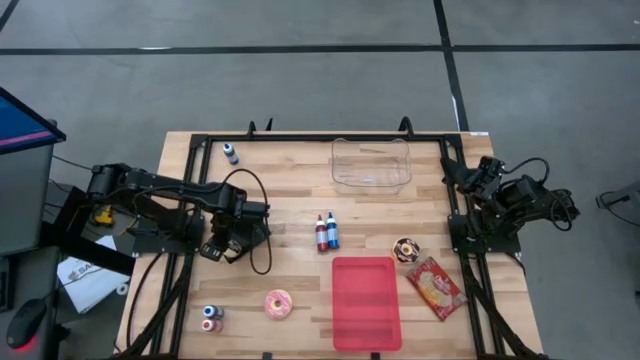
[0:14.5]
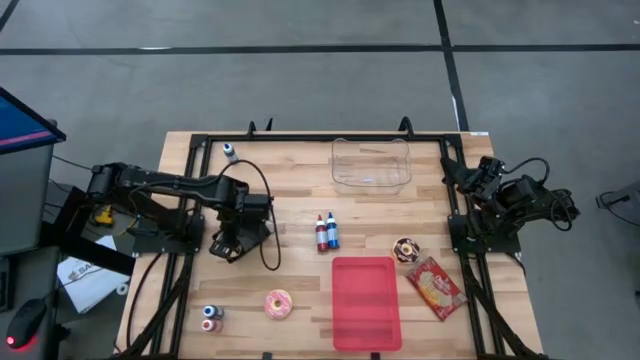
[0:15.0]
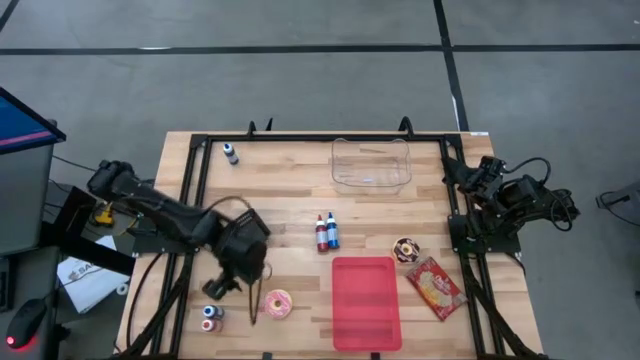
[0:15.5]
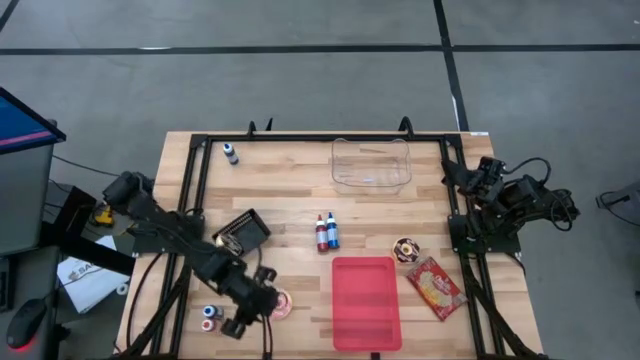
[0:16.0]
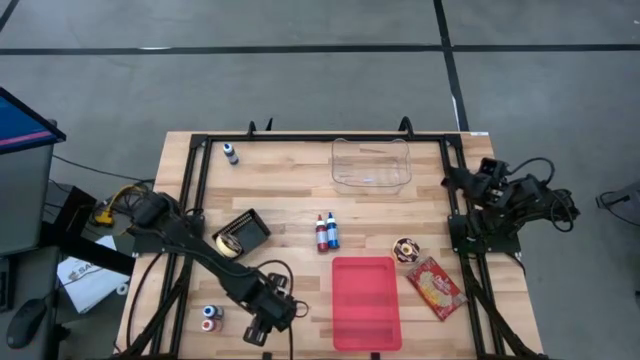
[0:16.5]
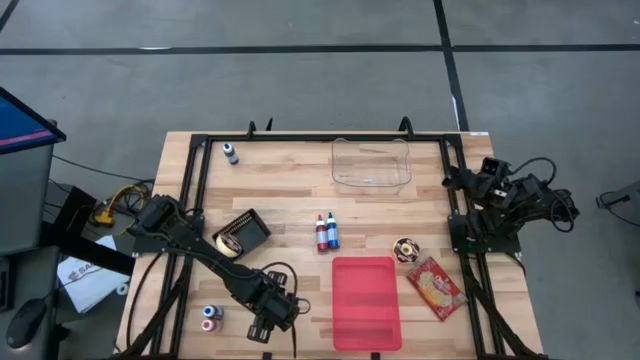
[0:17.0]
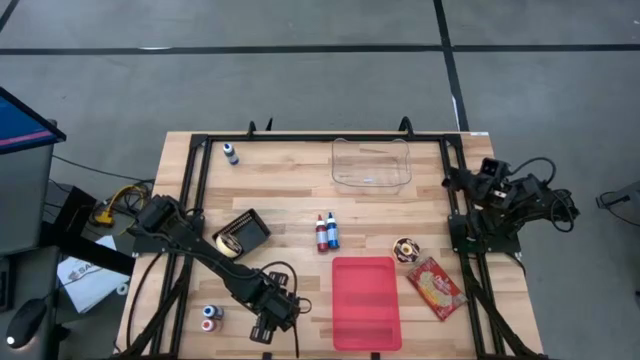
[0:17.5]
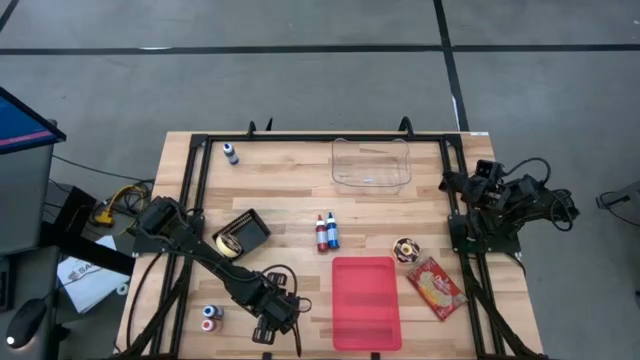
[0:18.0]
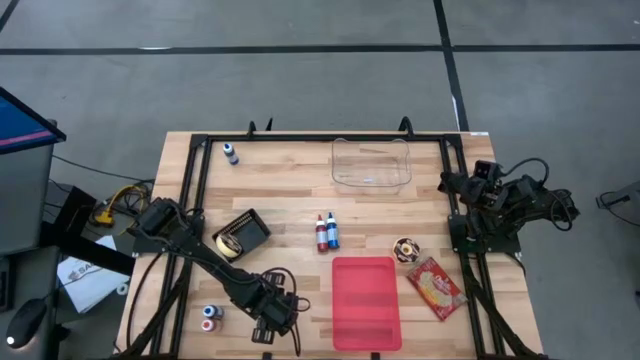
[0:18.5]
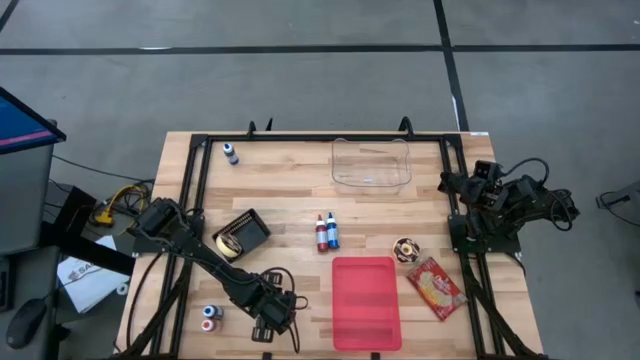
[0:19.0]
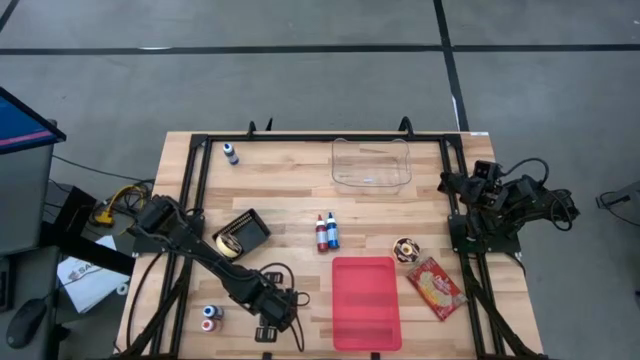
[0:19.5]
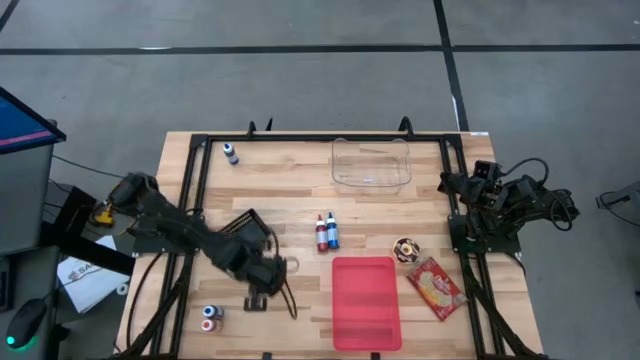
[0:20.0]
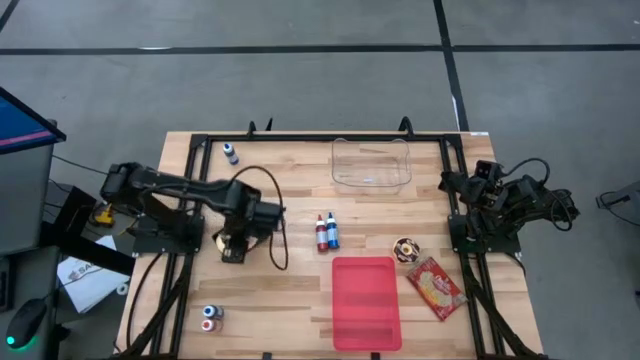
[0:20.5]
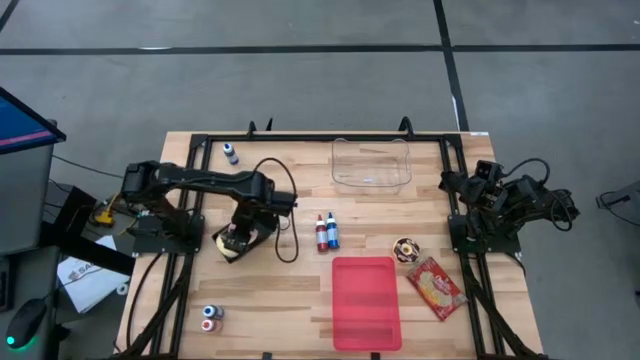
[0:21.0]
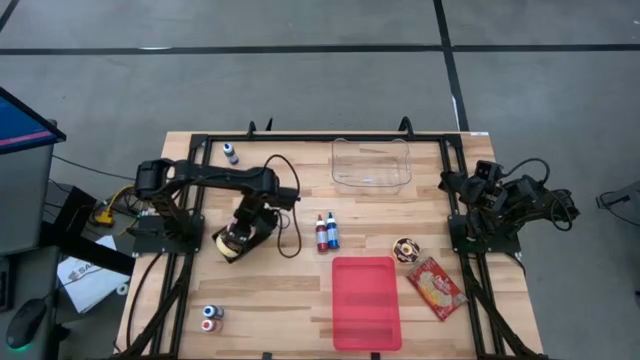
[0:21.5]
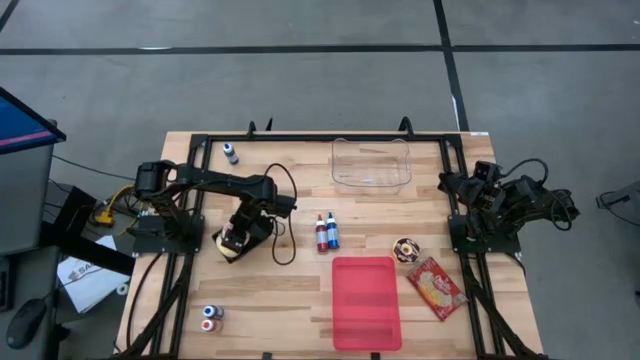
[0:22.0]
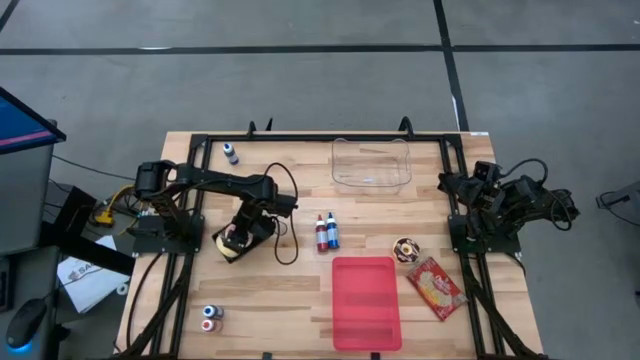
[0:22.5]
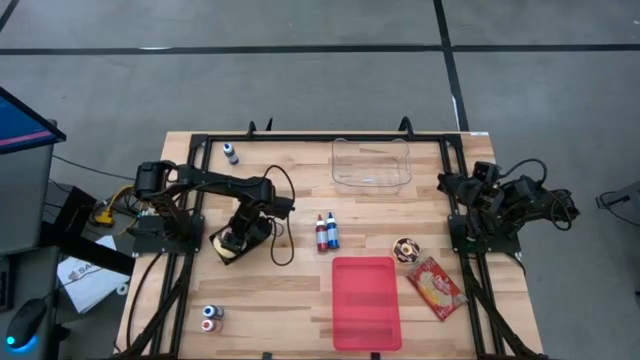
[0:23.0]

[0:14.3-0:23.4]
Put the pink donut into the black bin

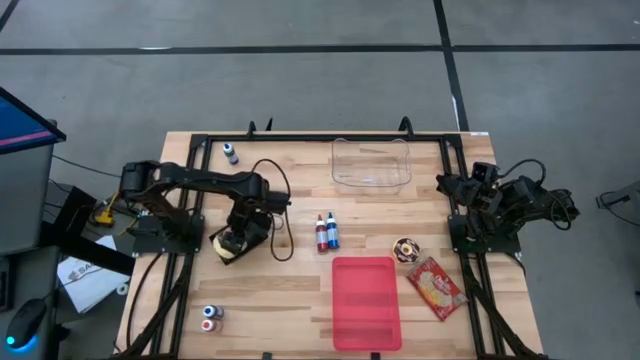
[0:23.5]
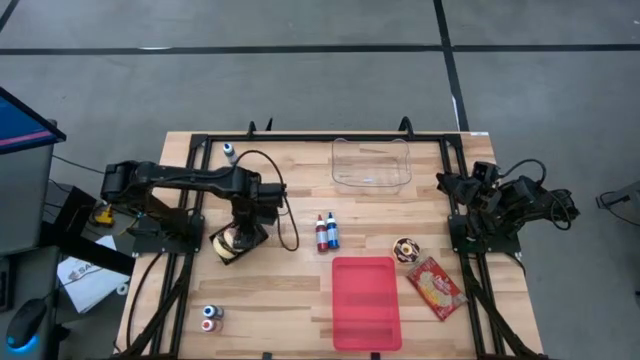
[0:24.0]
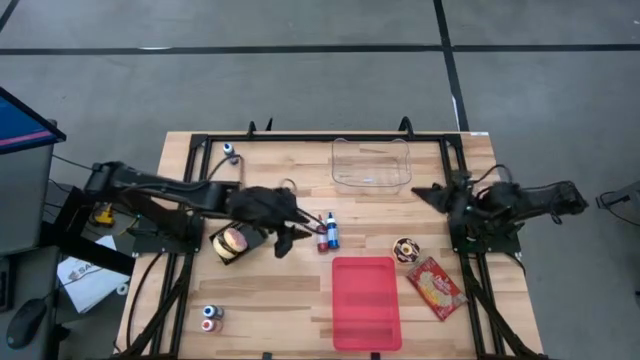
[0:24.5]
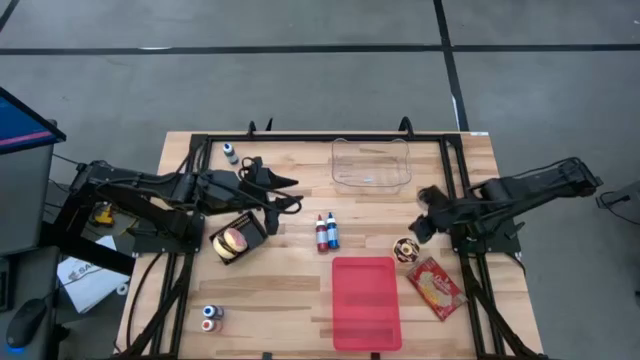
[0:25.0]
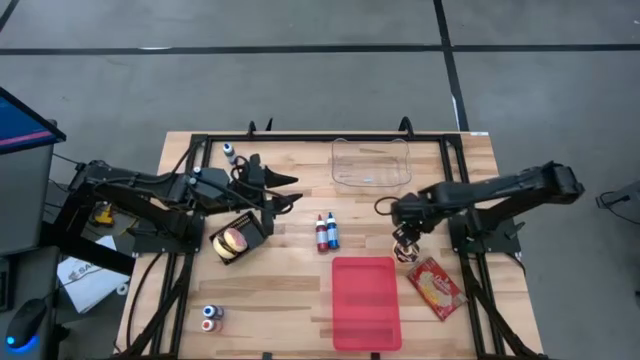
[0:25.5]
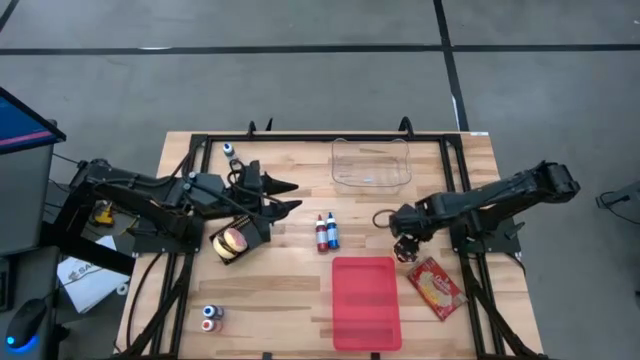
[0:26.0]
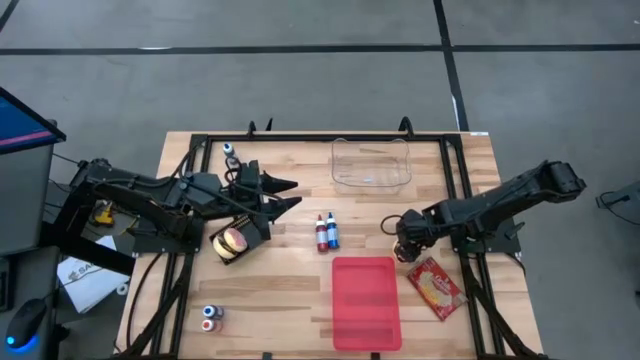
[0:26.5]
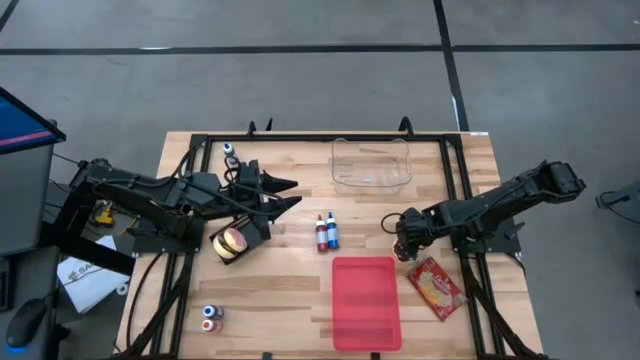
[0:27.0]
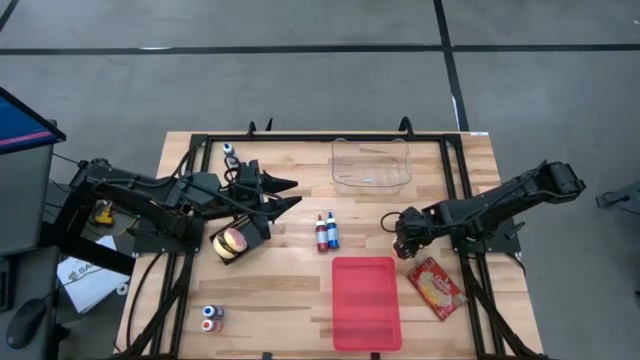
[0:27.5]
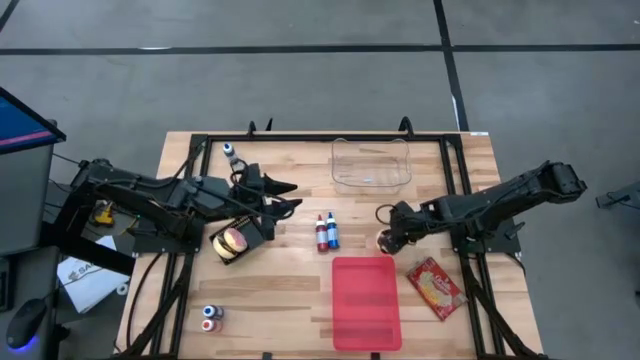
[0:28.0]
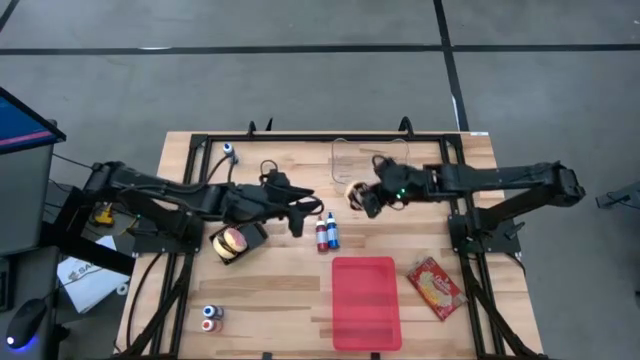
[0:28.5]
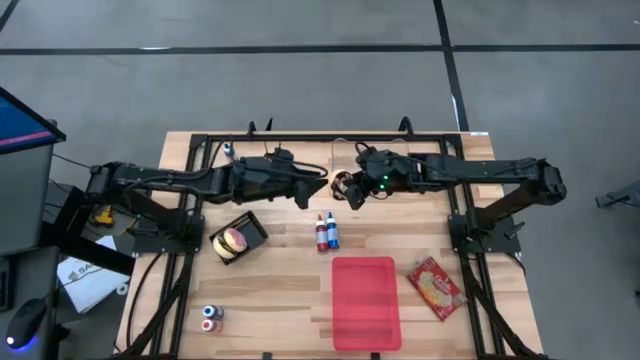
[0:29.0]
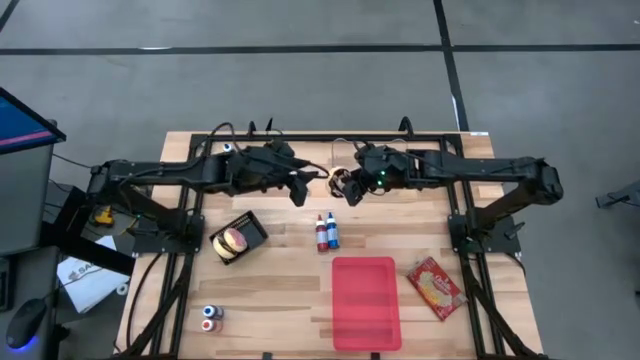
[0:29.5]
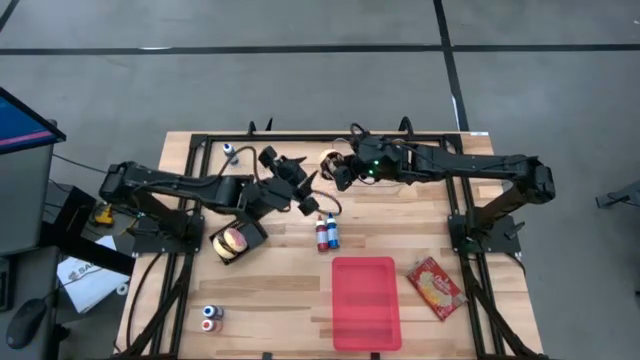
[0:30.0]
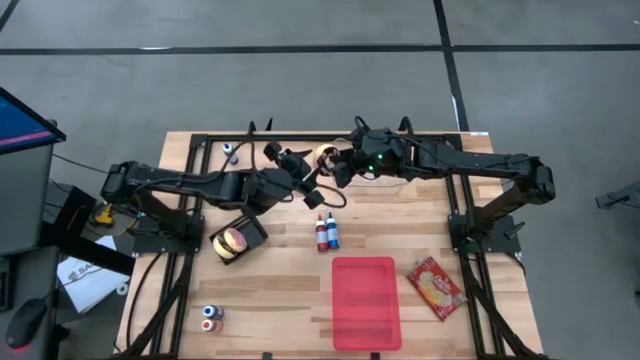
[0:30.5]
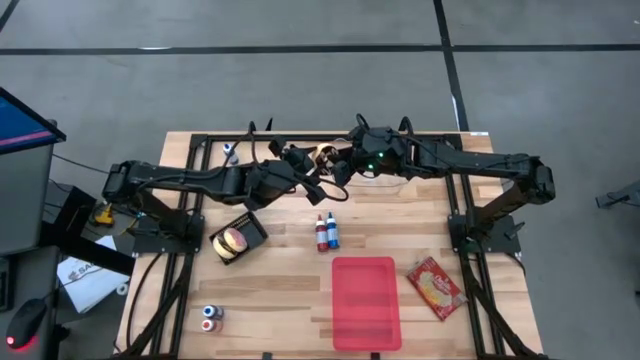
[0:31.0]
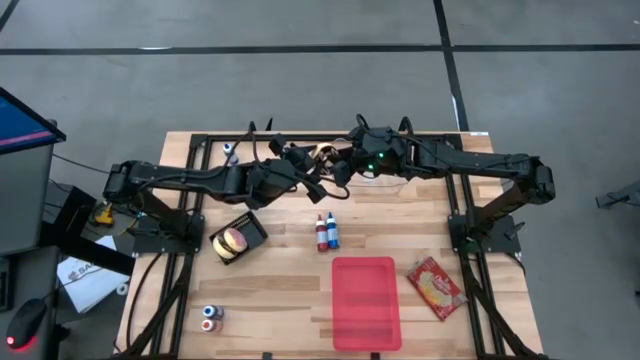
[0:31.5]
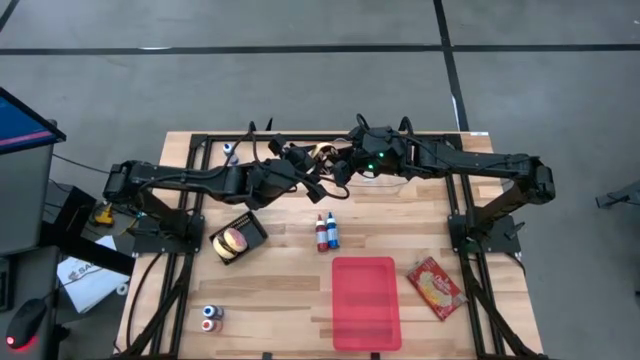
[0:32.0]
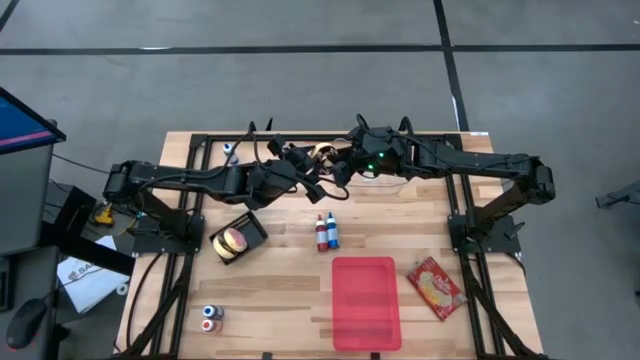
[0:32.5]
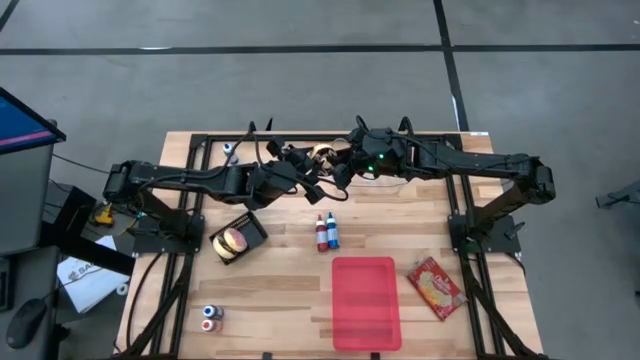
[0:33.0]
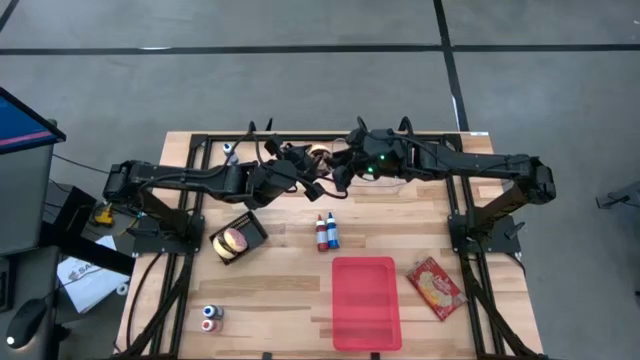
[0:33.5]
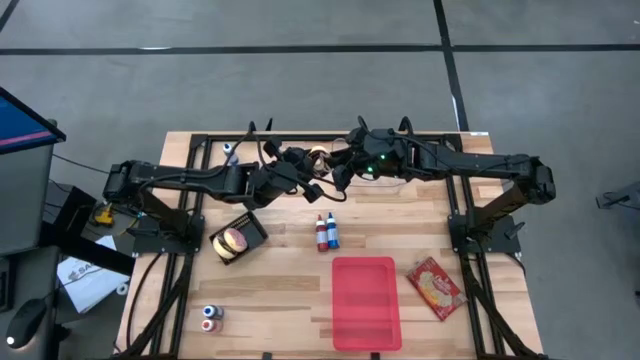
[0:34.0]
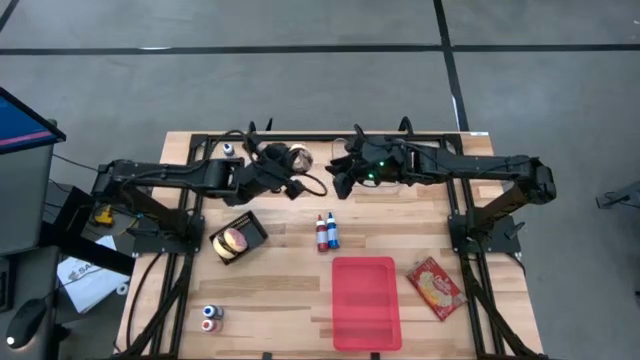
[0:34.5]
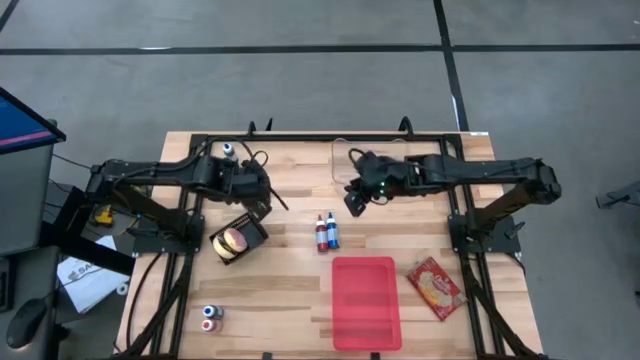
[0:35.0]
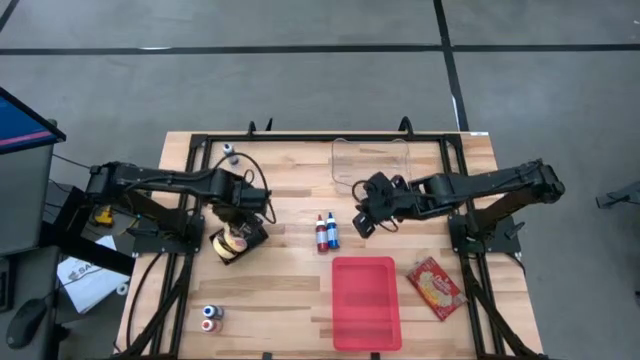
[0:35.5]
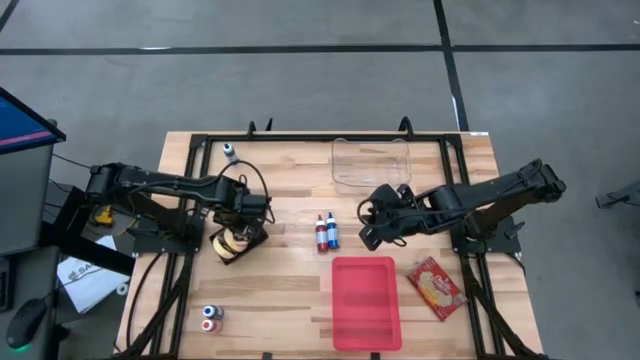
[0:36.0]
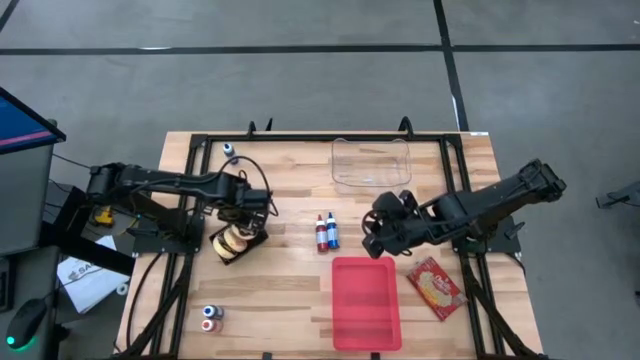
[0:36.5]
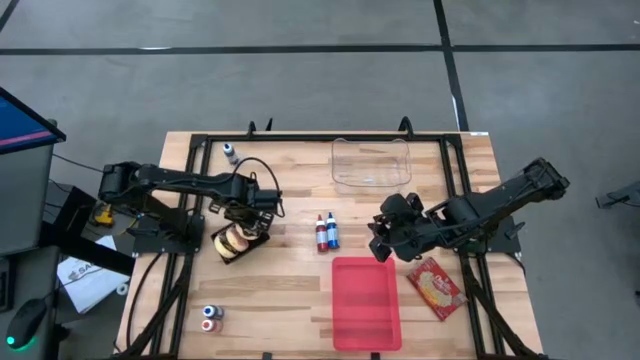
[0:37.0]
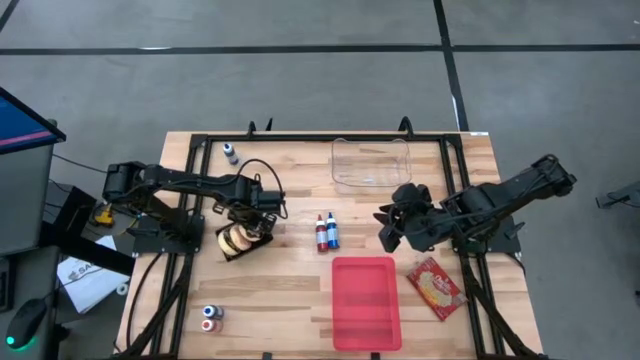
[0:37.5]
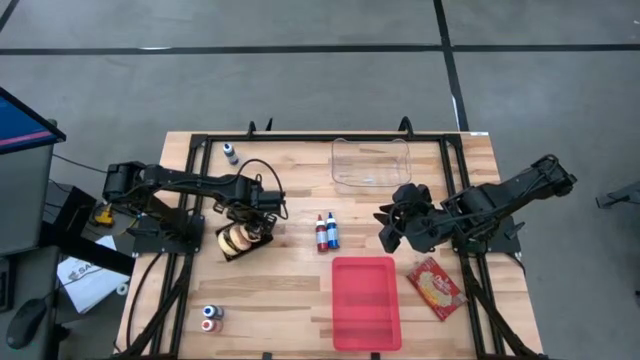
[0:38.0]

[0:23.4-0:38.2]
Put the black donut into the black bin
